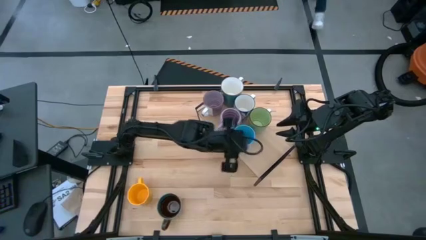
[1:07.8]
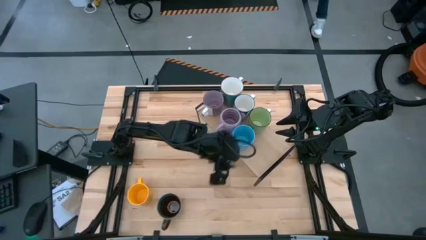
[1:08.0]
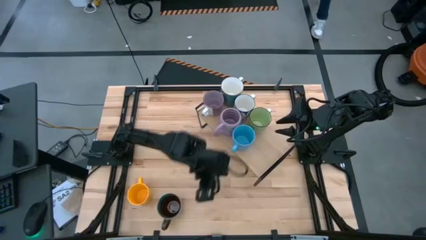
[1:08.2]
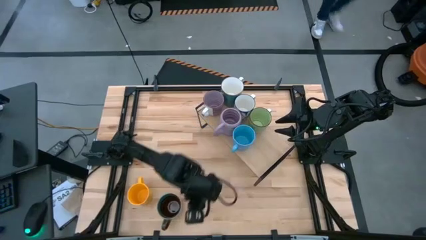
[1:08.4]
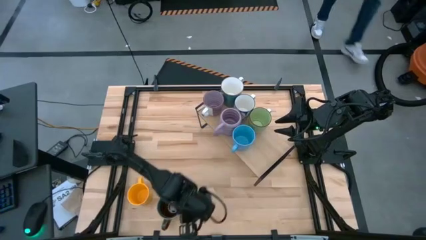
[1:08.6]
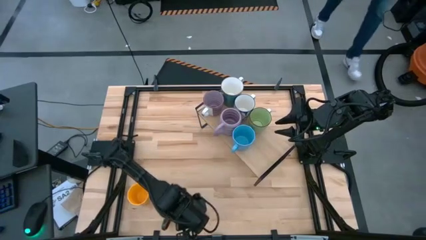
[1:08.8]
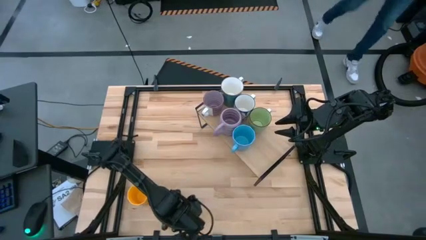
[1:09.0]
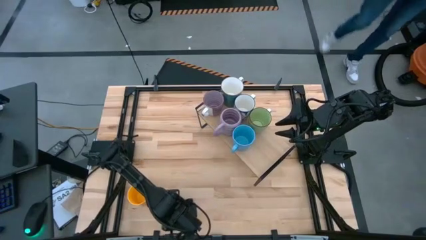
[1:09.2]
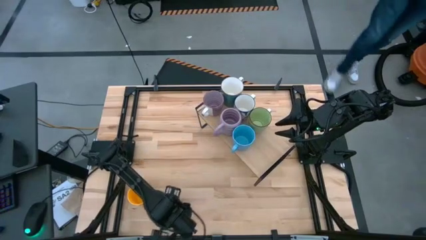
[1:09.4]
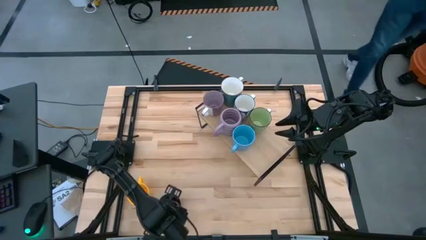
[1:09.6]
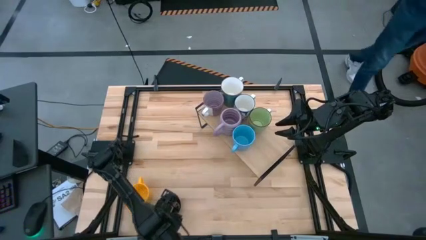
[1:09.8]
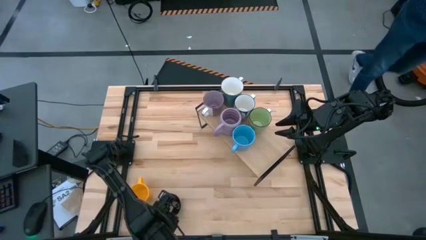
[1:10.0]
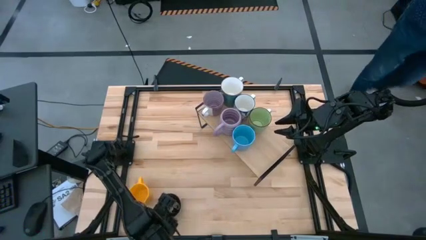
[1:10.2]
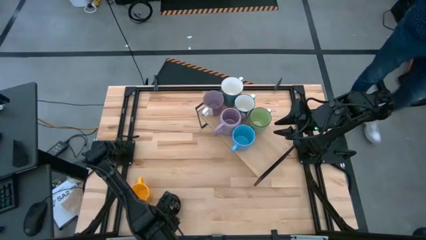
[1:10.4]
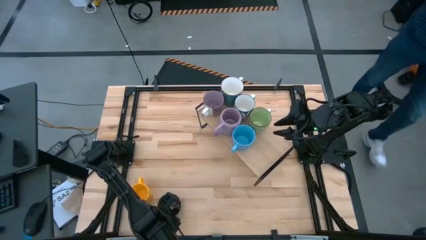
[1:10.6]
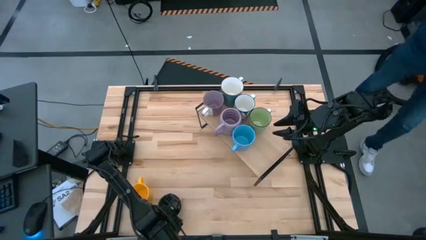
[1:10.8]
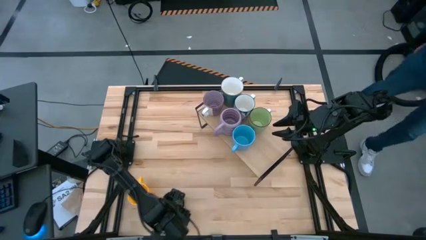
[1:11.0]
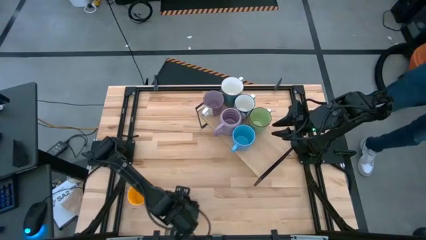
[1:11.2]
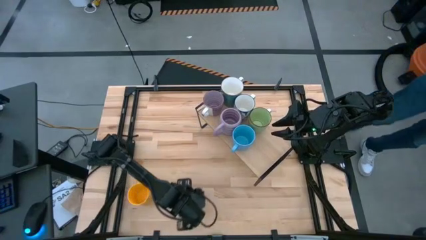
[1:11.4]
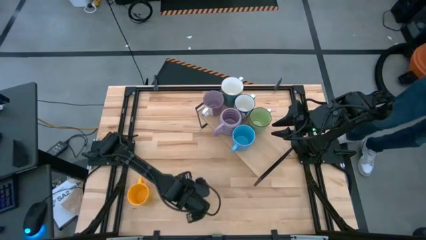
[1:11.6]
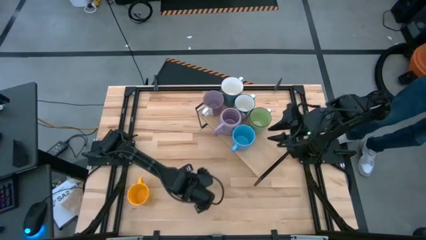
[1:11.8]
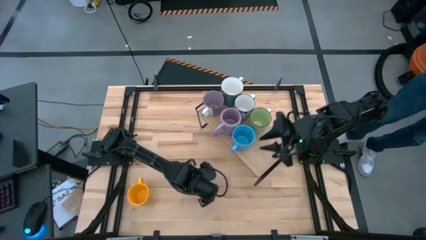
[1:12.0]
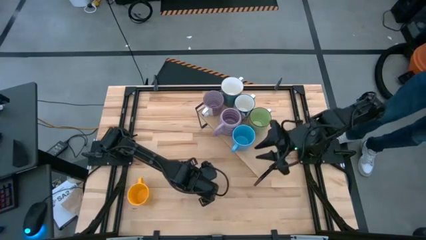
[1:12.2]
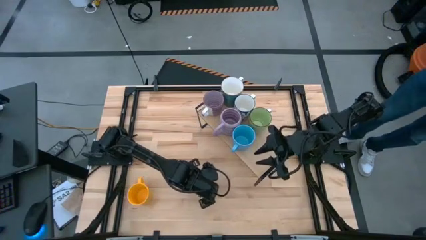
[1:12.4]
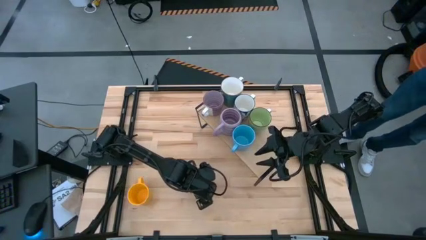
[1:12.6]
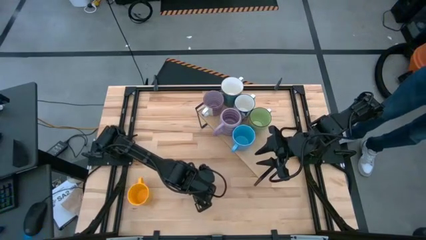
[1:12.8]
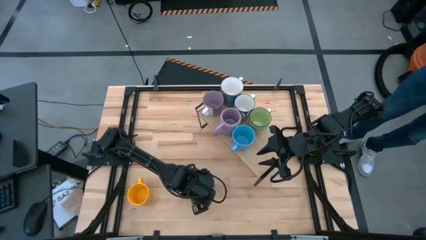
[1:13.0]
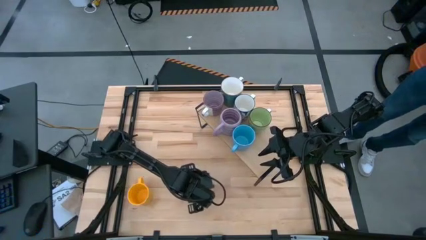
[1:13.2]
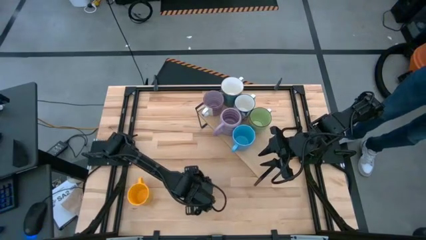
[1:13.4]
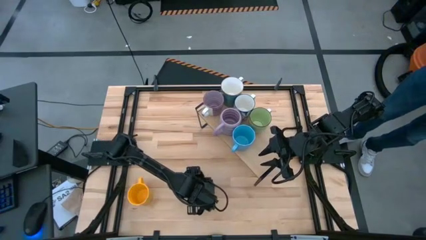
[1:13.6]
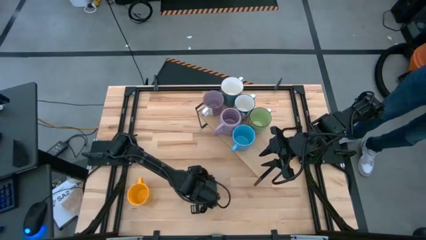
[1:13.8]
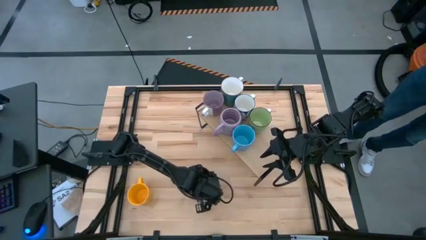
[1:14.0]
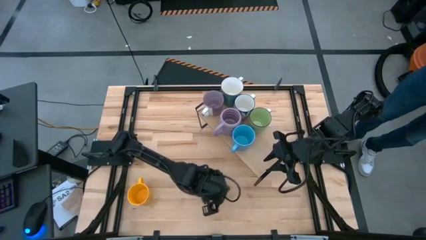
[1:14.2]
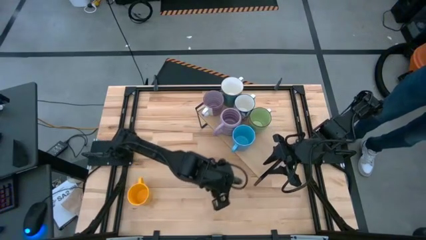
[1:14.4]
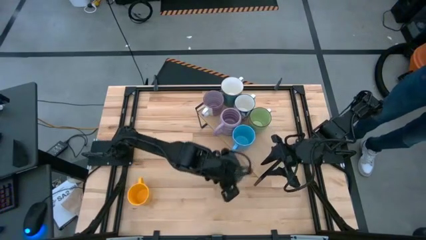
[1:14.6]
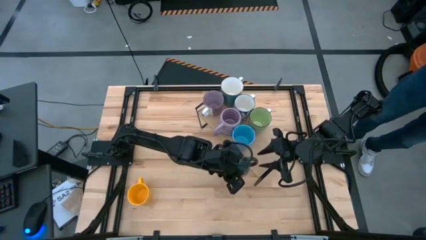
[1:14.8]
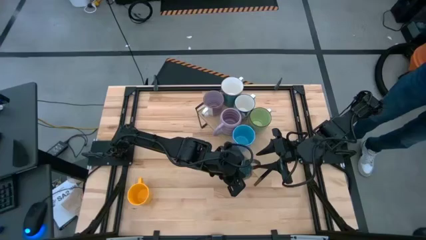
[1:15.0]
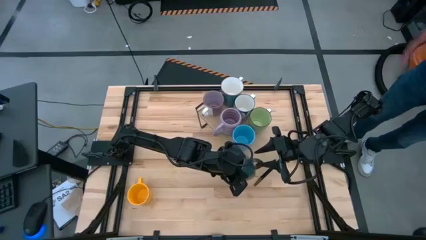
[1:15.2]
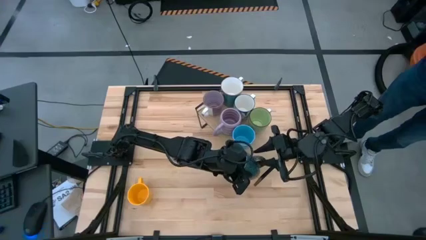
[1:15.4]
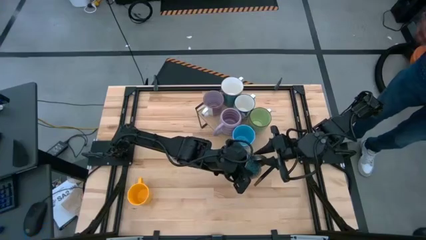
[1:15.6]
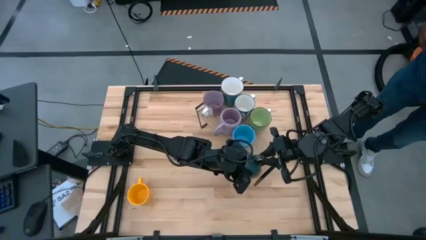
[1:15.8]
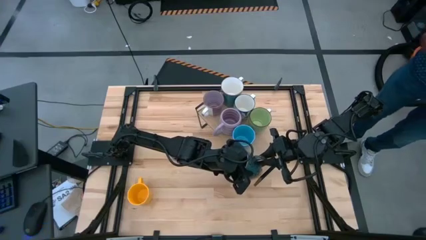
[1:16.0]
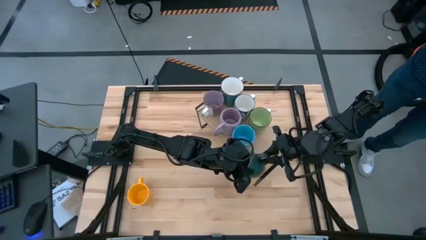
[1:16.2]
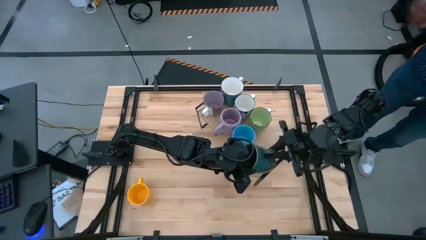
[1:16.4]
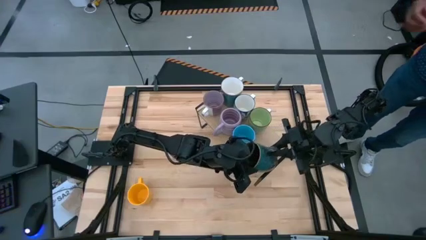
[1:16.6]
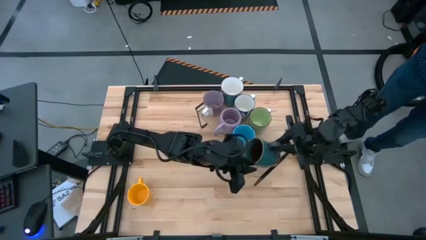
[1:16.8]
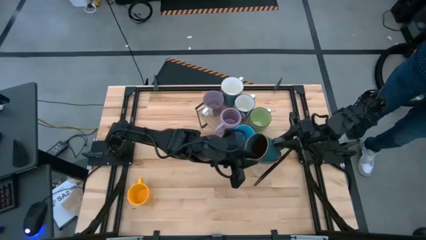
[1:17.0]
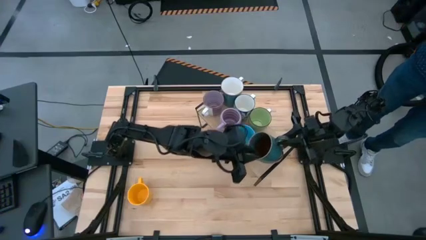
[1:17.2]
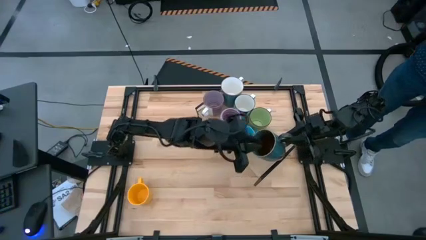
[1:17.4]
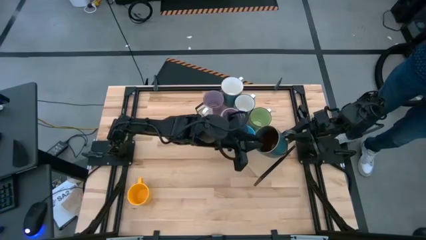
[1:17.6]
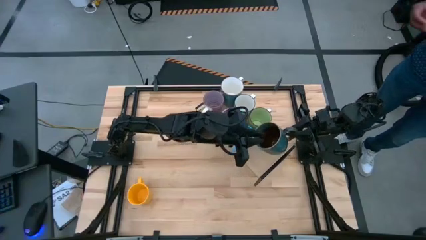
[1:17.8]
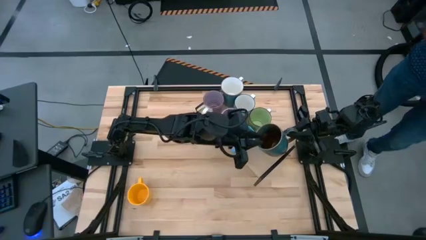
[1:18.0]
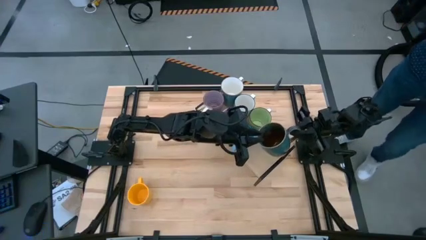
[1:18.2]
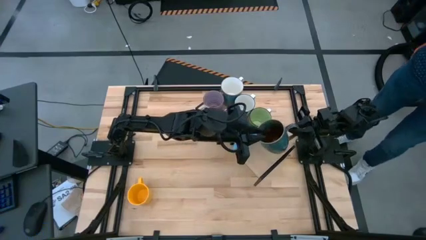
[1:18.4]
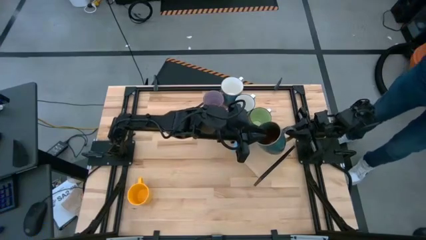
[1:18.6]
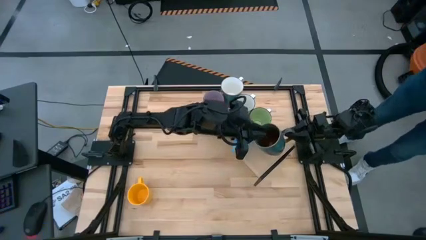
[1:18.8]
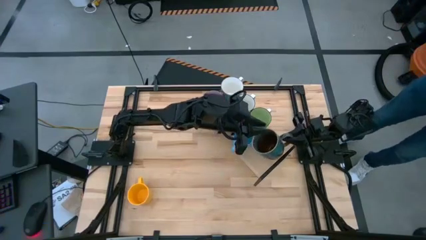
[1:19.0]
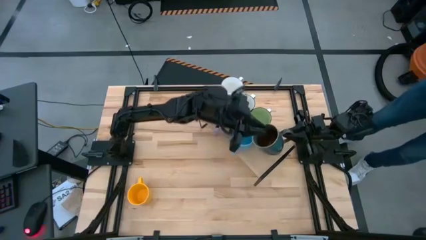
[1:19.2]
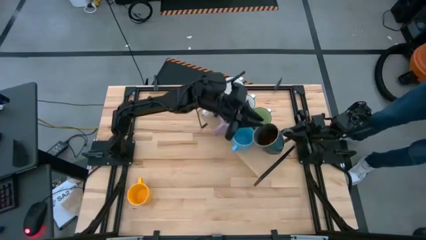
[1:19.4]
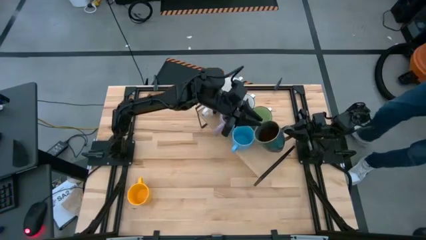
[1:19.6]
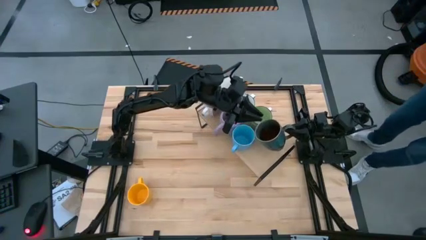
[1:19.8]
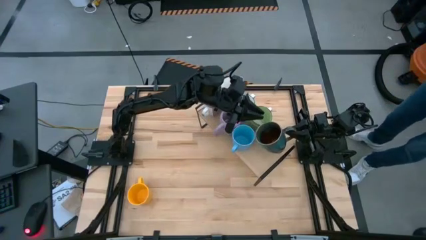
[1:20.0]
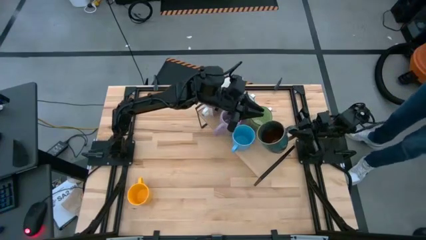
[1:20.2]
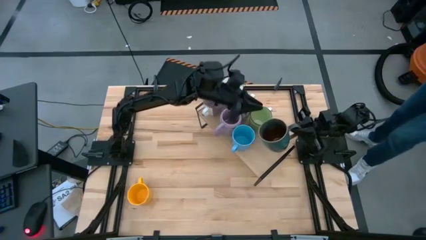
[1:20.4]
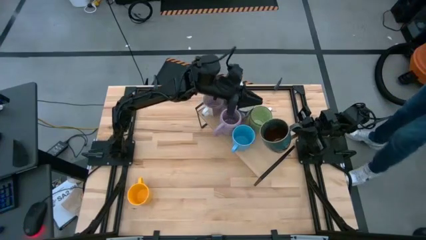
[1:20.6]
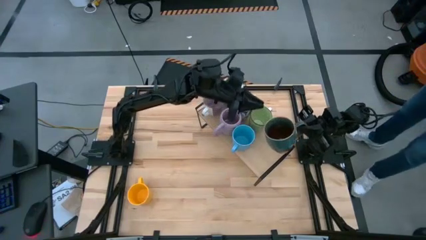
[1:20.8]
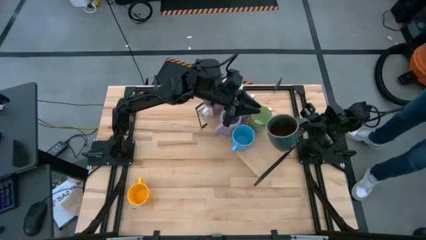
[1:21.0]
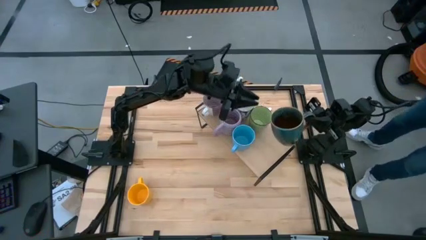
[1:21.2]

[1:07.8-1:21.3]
Task: Place coffee mugs
Put the brown mug on the shelf
